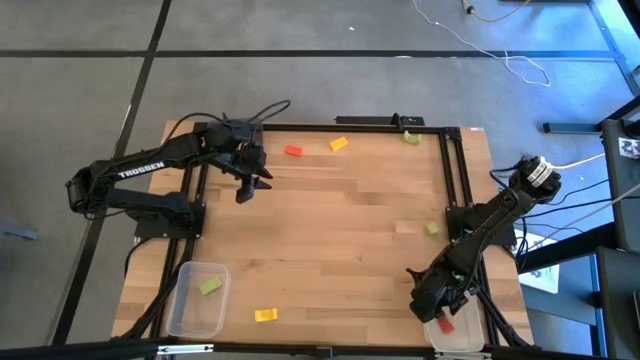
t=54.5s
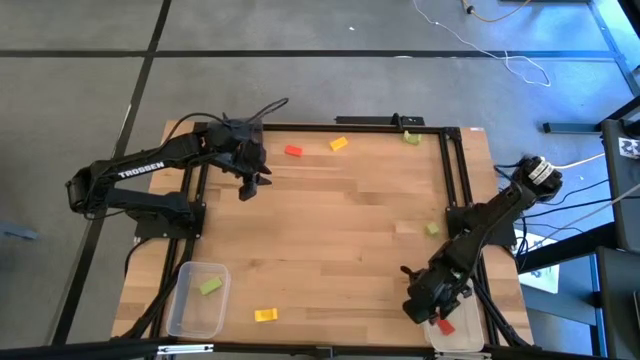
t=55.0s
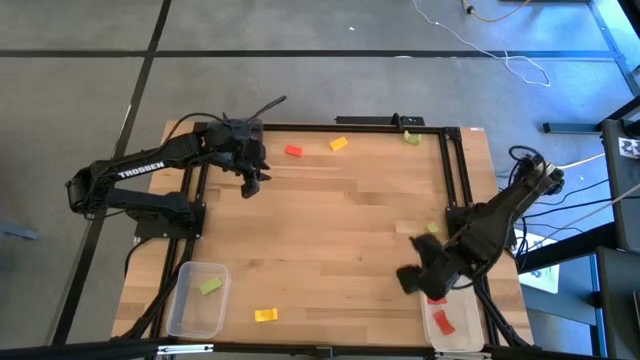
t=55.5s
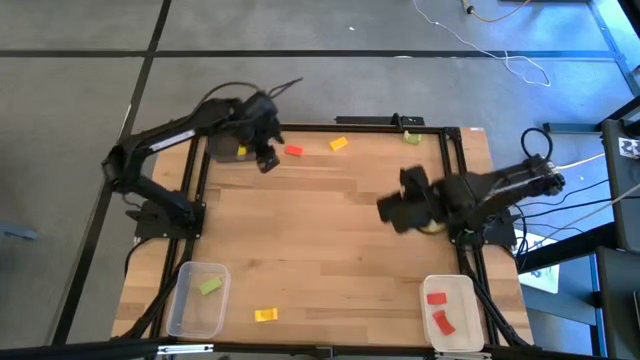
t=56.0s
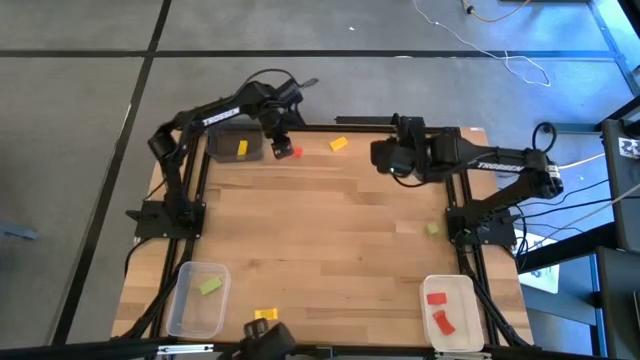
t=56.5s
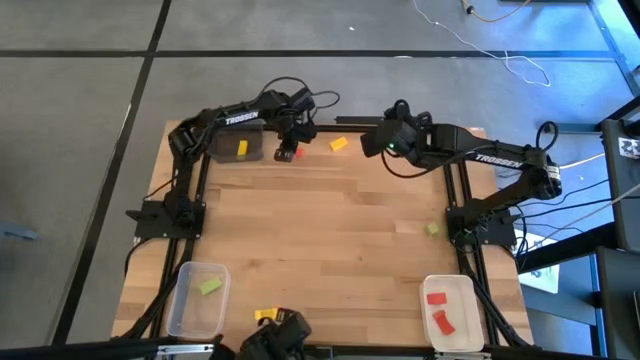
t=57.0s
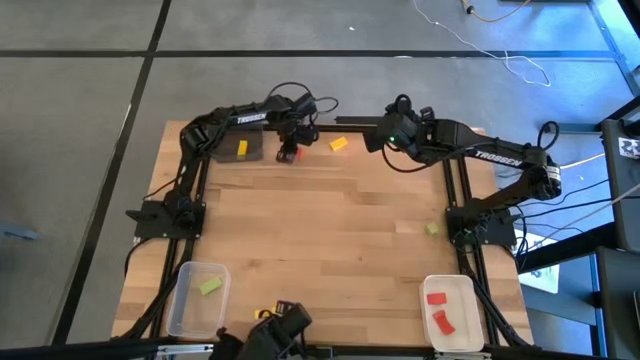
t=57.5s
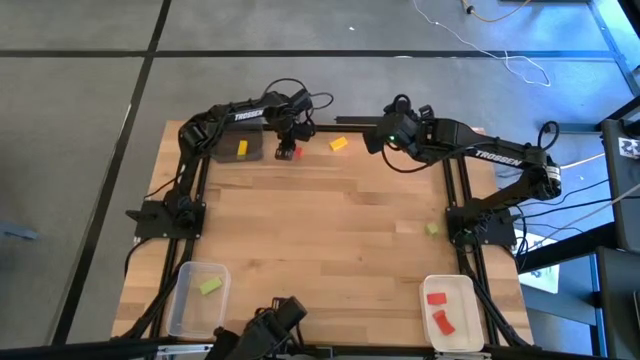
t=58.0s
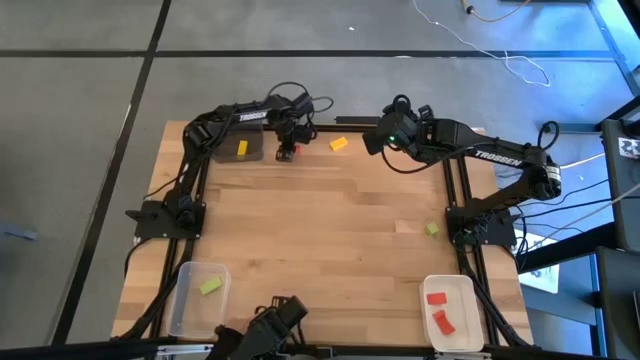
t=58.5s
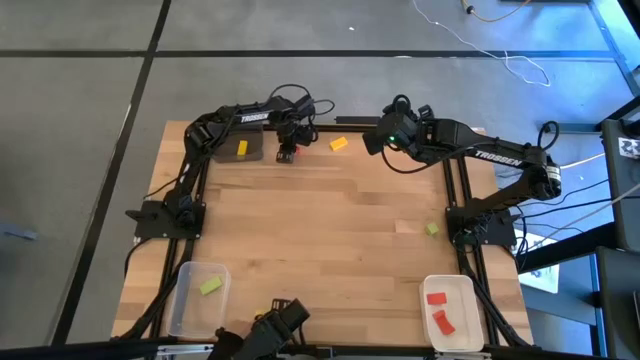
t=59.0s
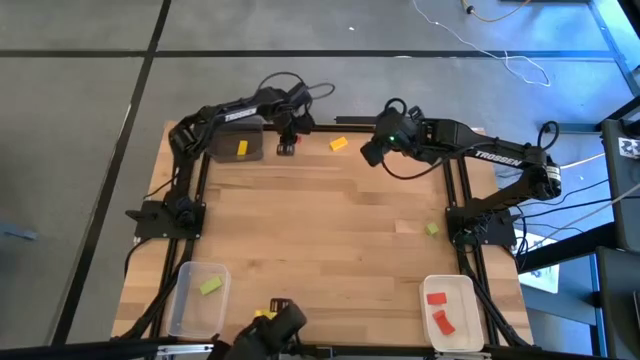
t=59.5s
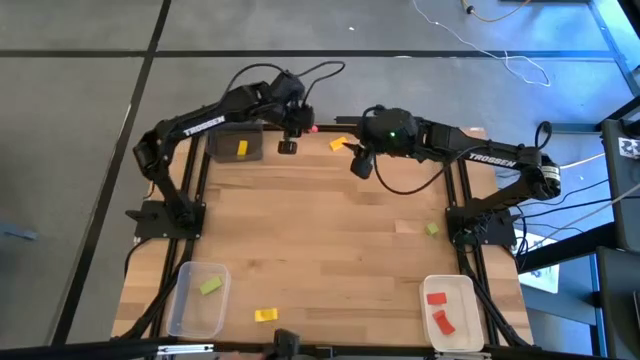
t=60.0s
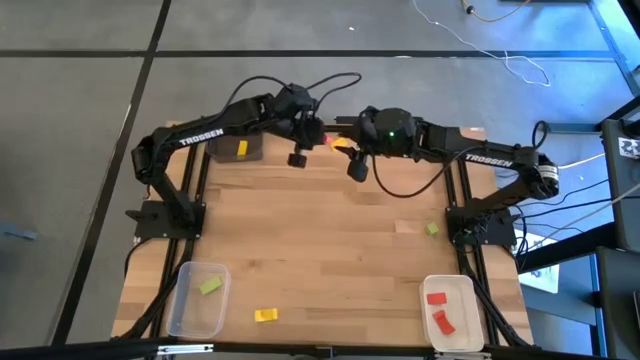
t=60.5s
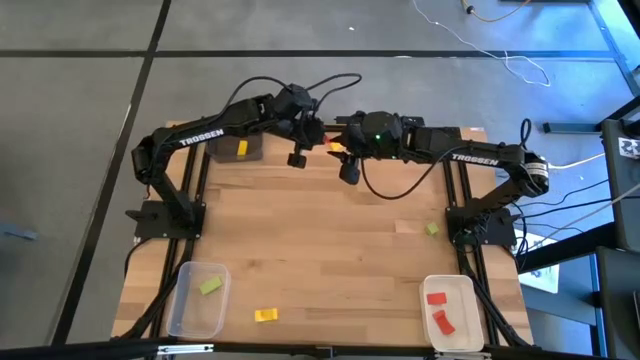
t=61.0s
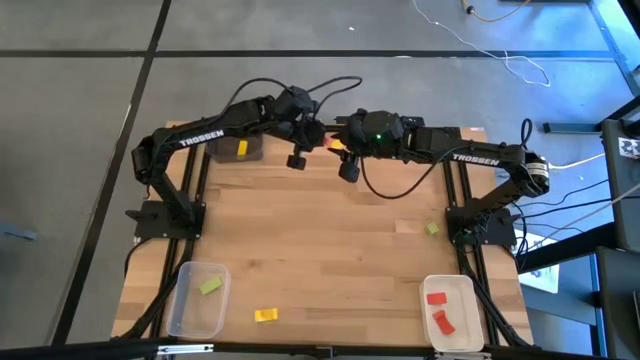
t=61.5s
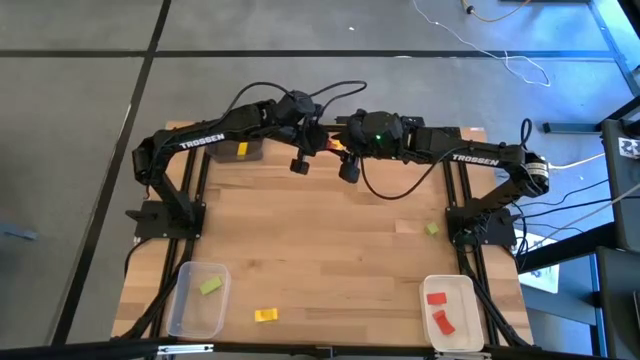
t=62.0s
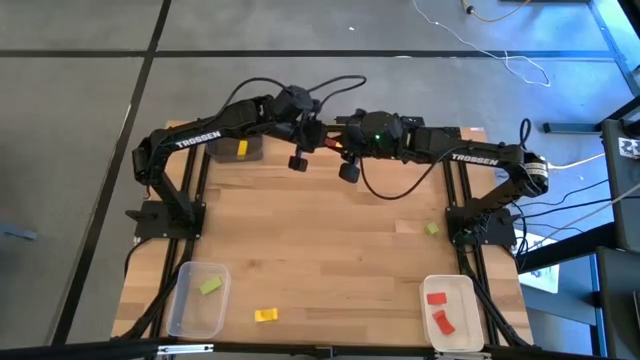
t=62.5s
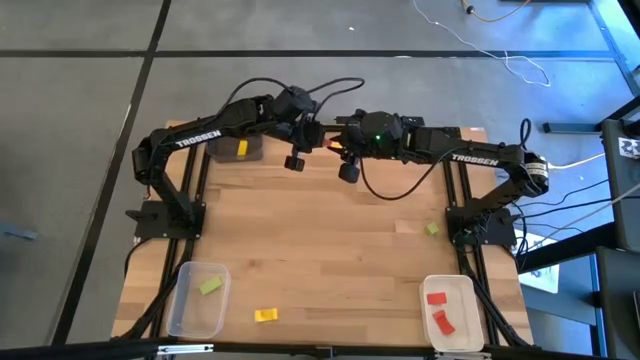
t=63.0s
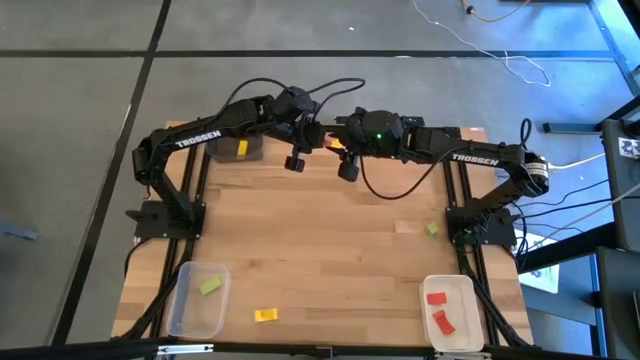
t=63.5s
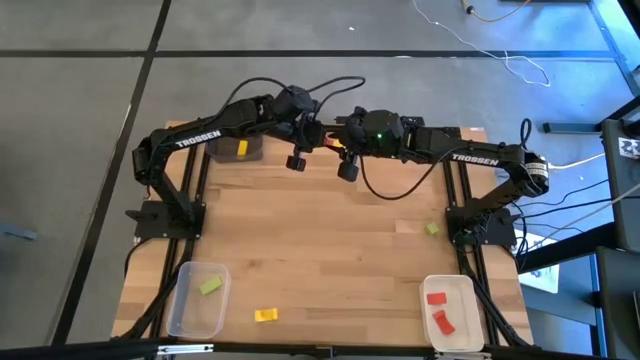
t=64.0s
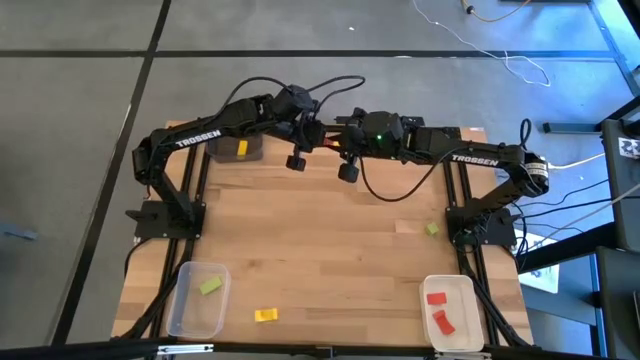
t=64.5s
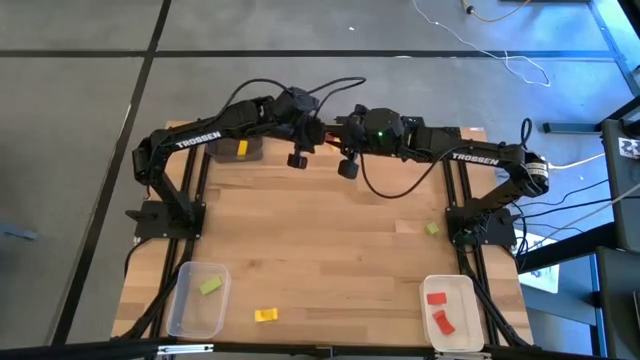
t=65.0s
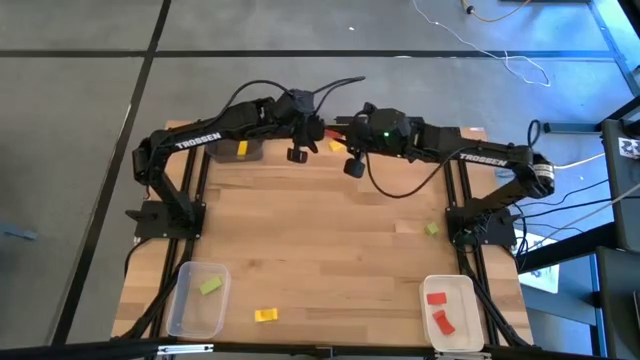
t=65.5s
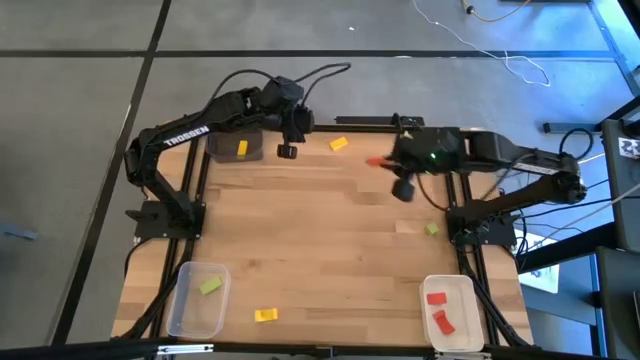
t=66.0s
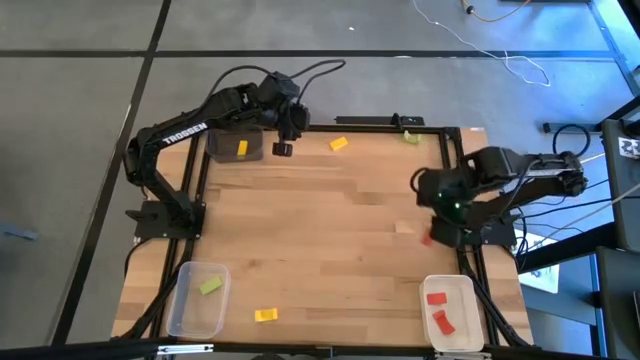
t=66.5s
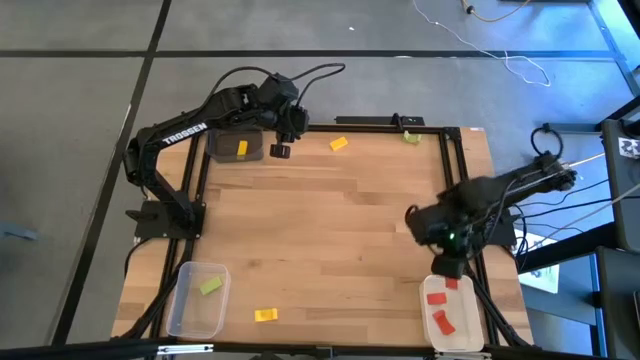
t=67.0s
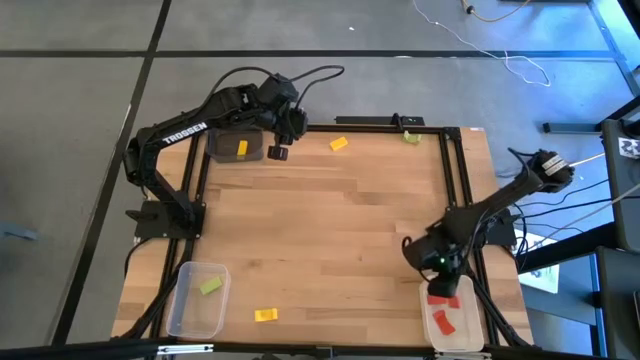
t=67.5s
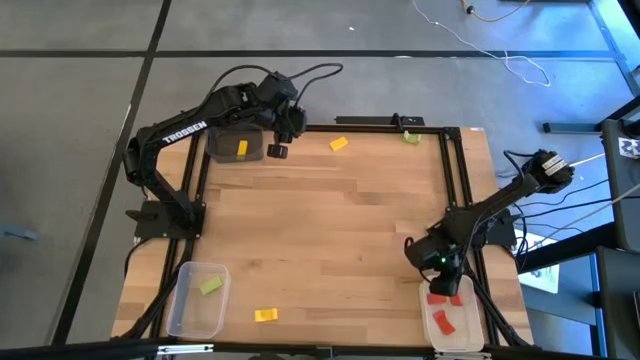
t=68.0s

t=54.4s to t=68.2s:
Task: Sort & place blocks by color
Put the orange block into the white bin

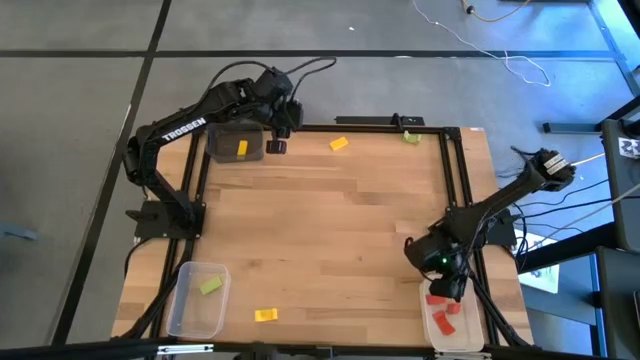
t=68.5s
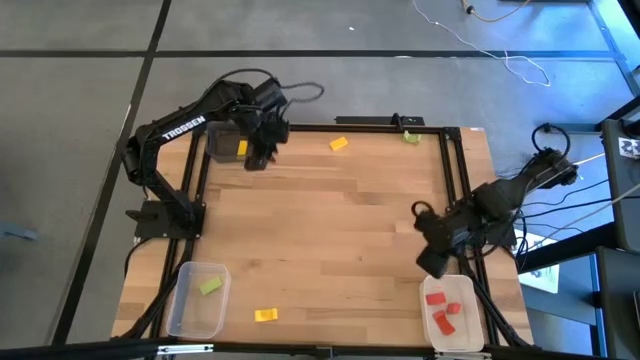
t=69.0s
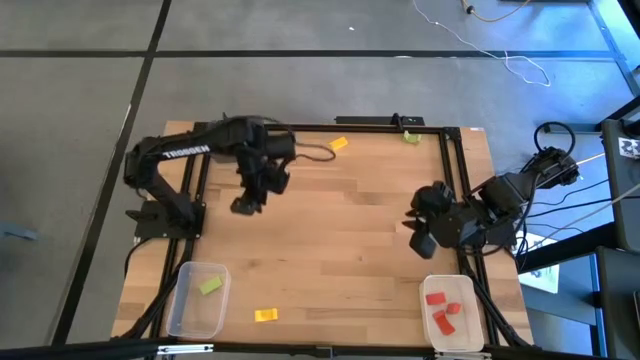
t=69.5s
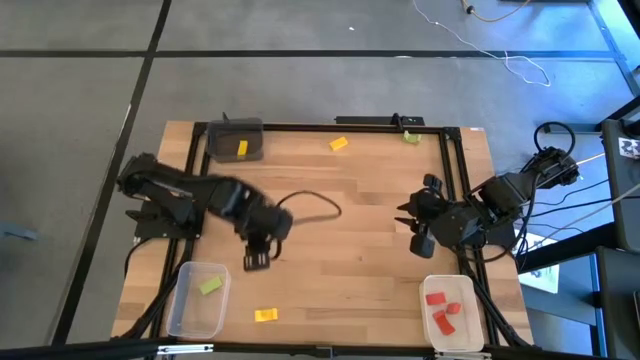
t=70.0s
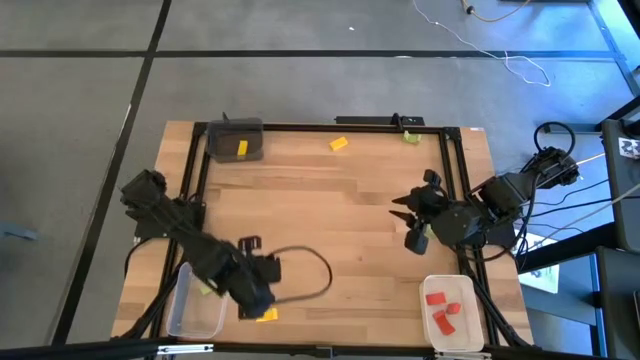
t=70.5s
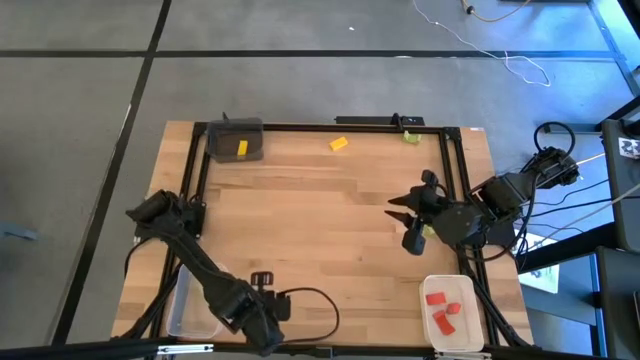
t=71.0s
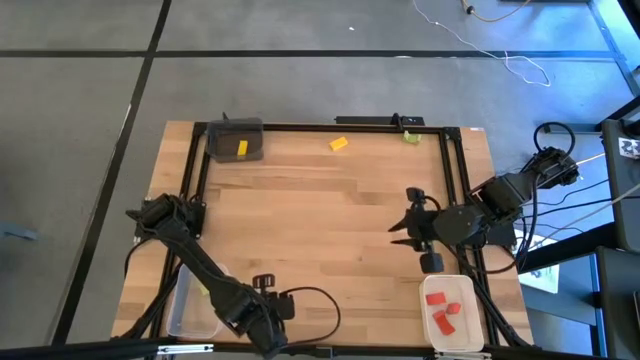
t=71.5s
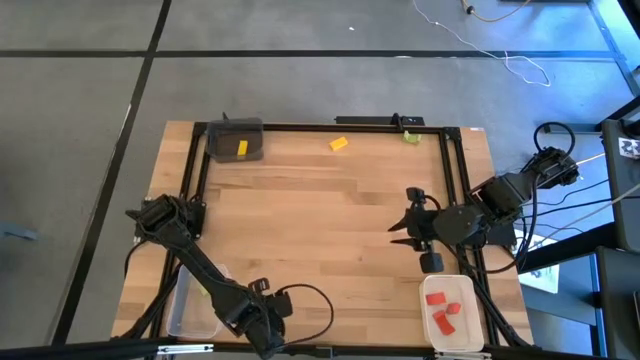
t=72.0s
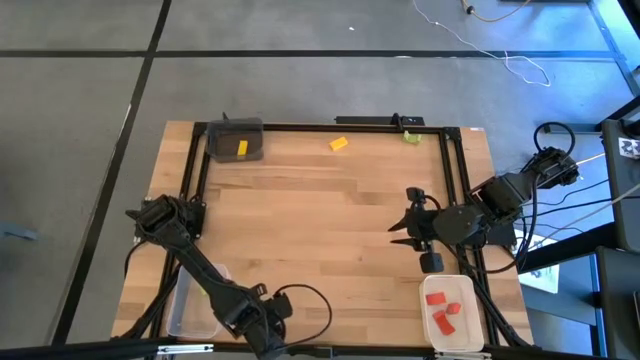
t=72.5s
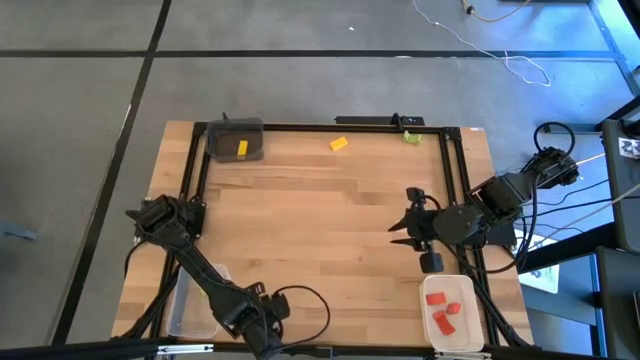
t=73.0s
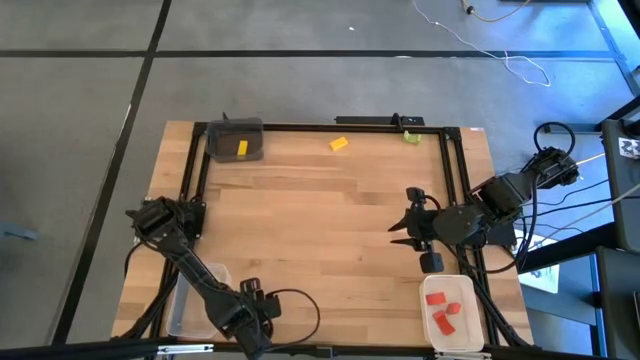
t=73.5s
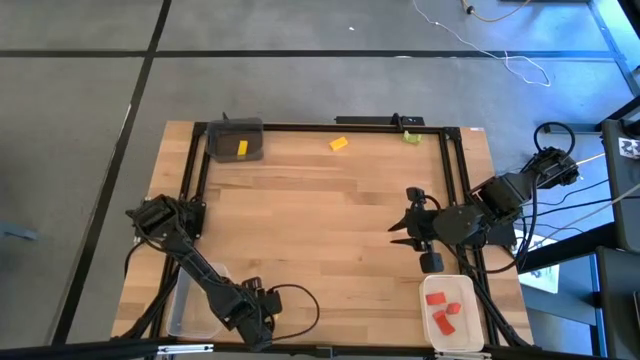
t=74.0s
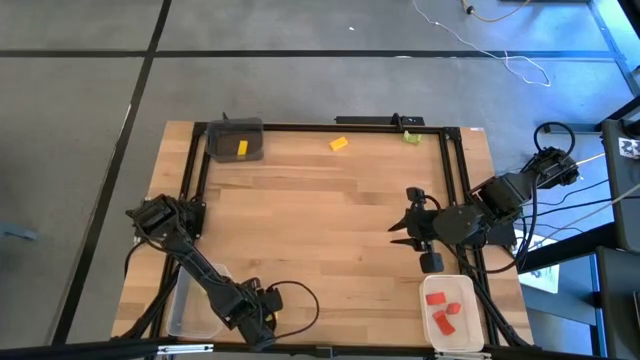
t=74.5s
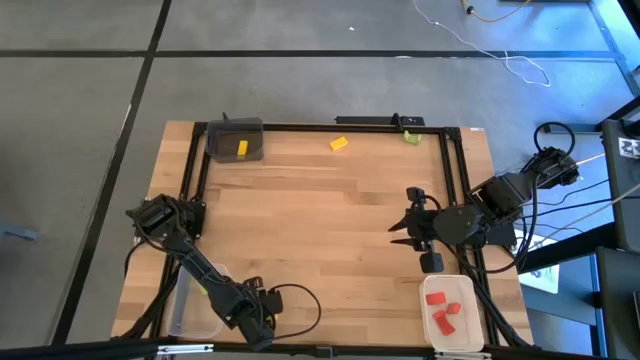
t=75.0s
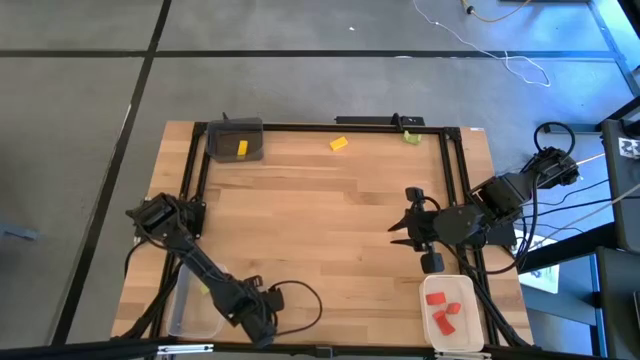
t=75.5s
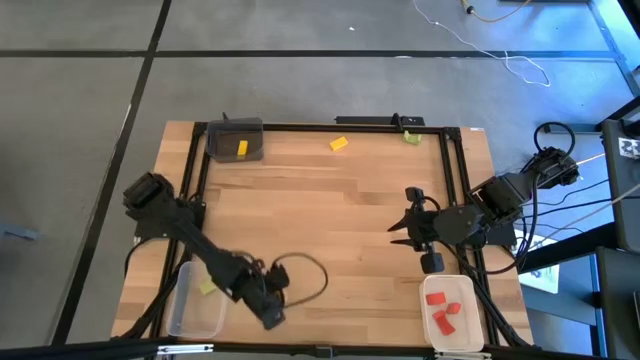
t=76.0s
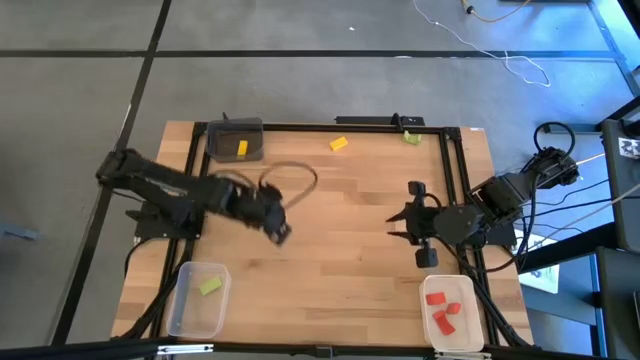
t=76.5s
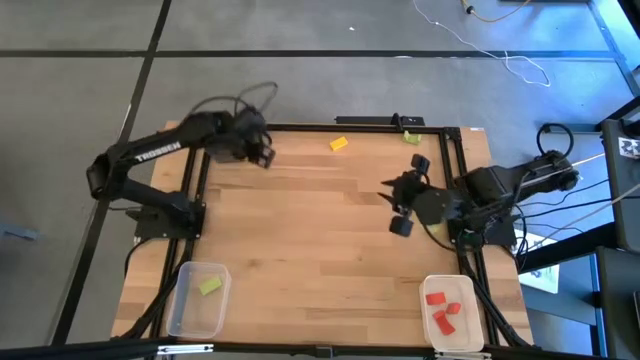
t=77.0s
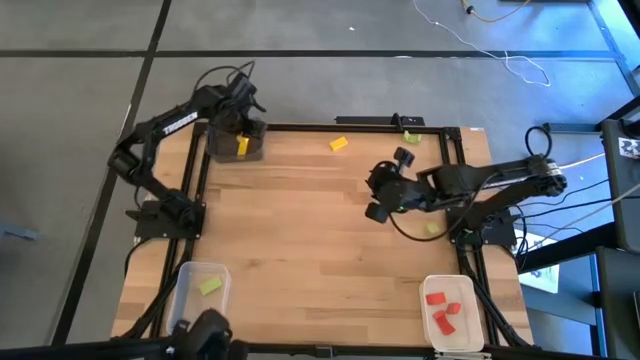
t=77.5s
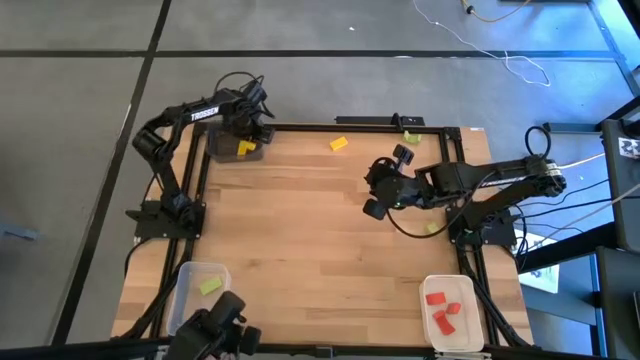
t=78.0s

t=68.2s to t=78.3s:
Put the bottom yellow block into the black bin
